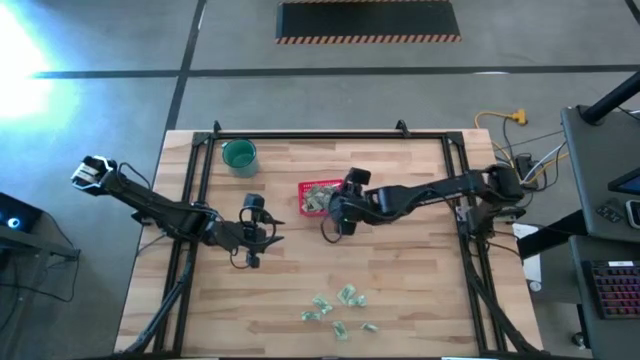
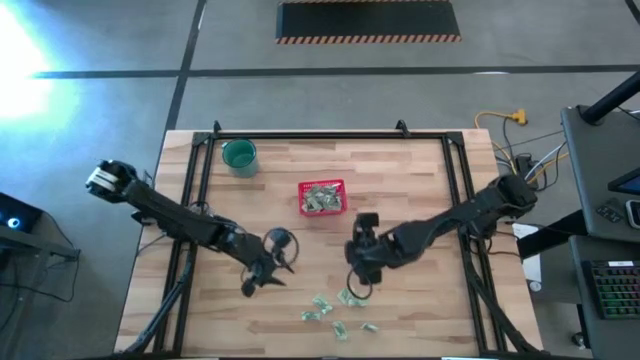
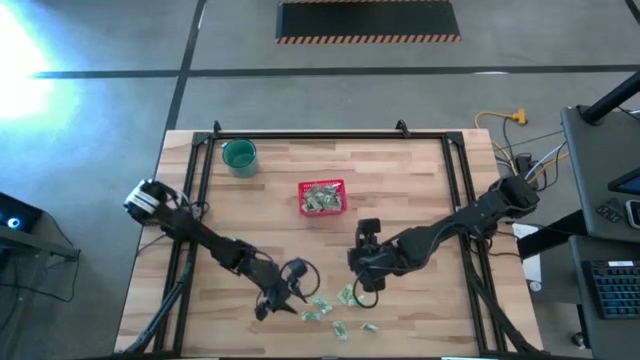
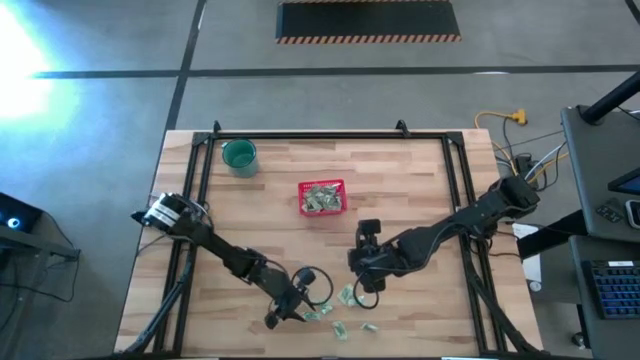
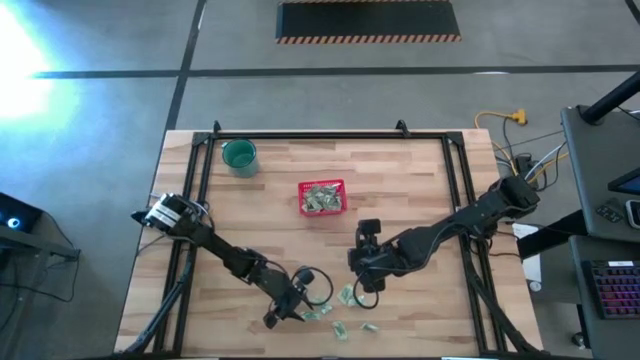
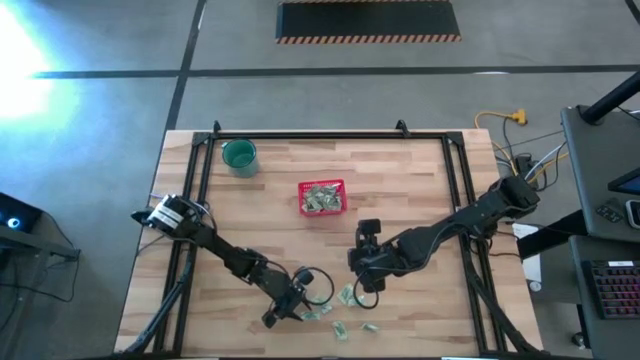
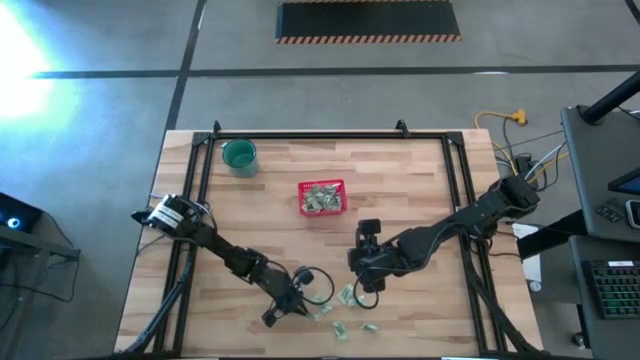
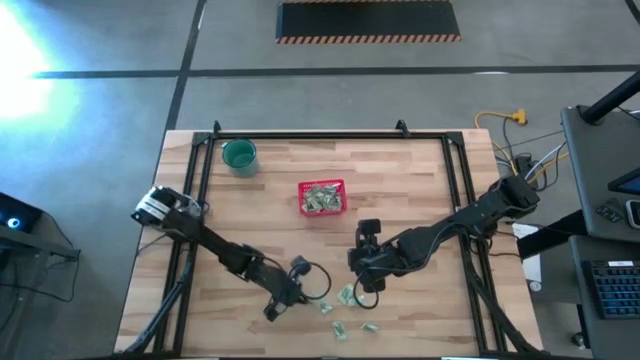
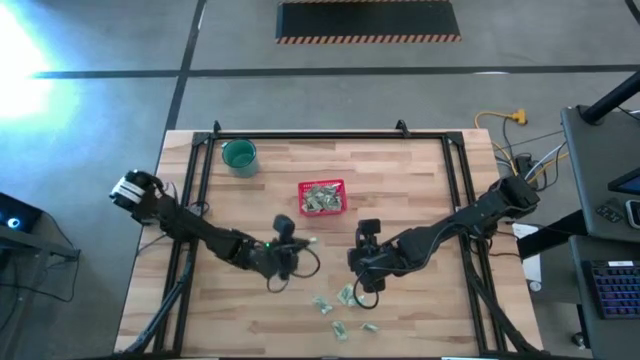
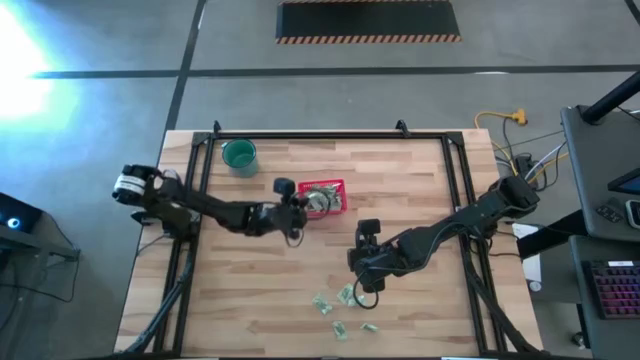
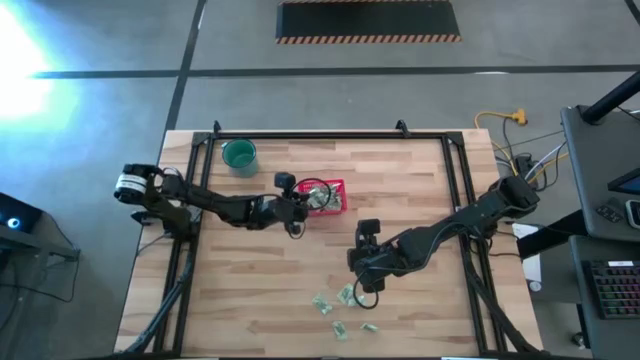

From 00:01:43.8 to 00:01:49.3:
Task: Pick and place items into bin
Put the stevia packet into the red bin

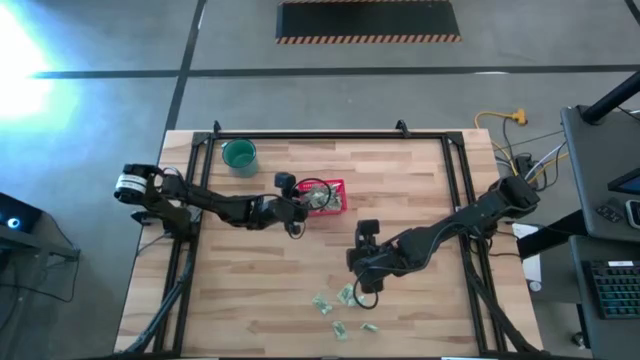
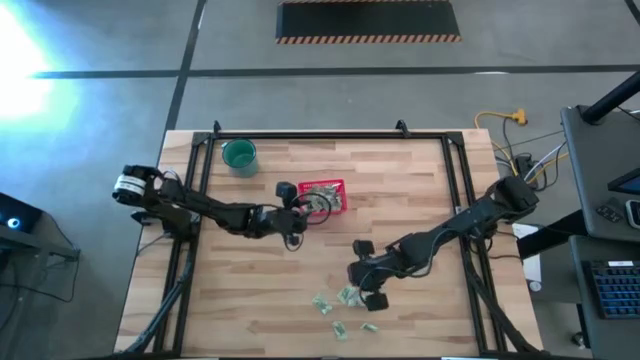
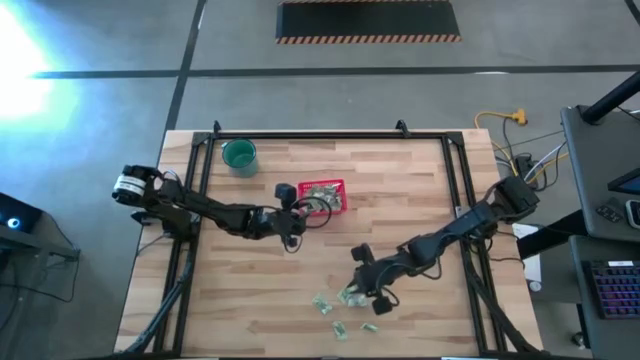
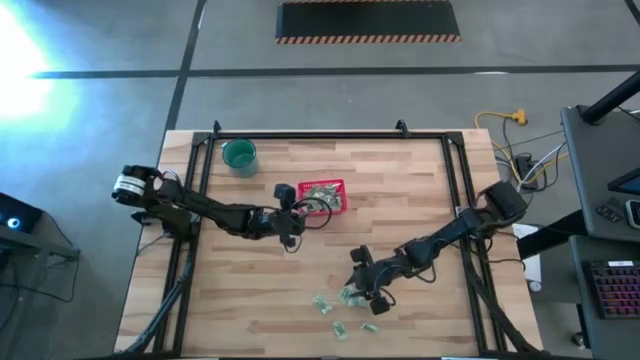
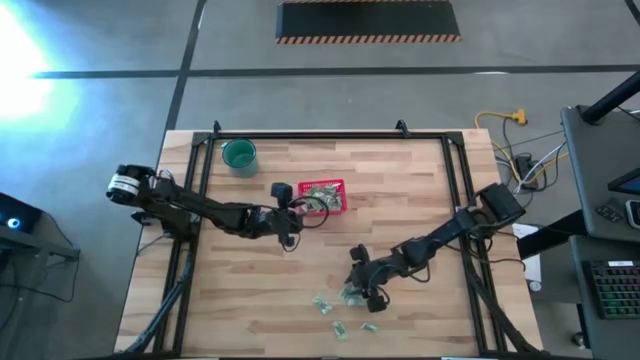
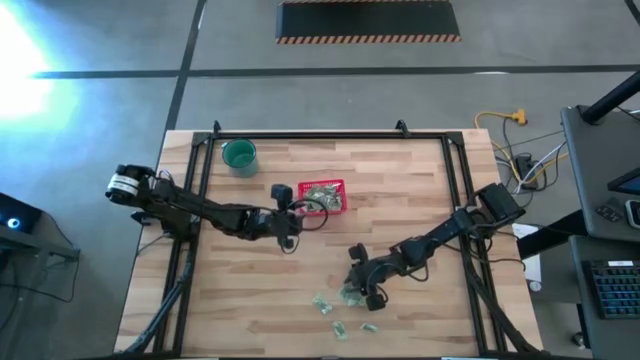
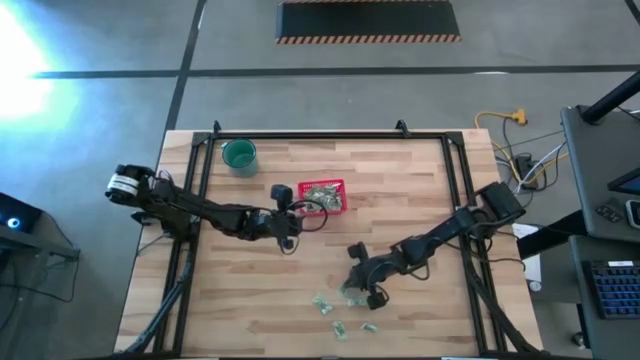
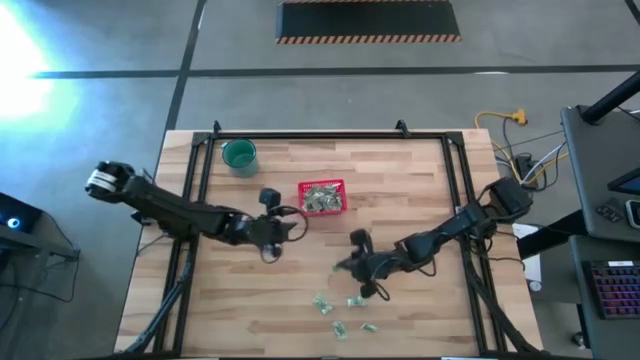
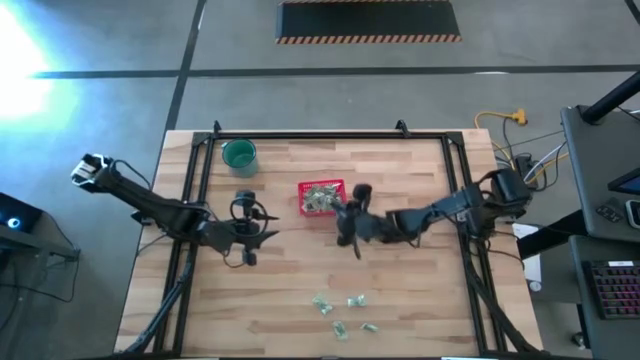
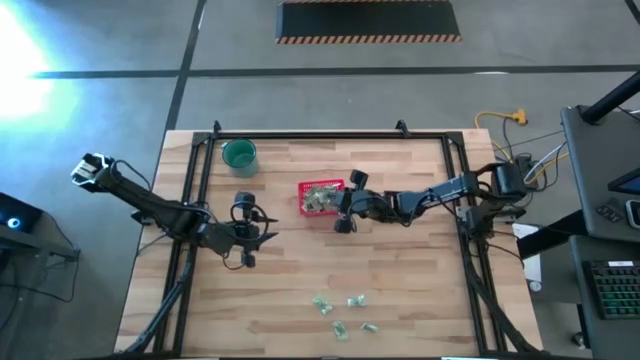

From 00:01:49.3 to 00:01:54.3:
Put the stevia packet into the red bin

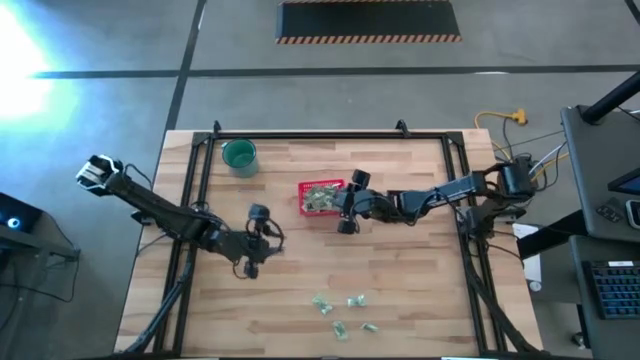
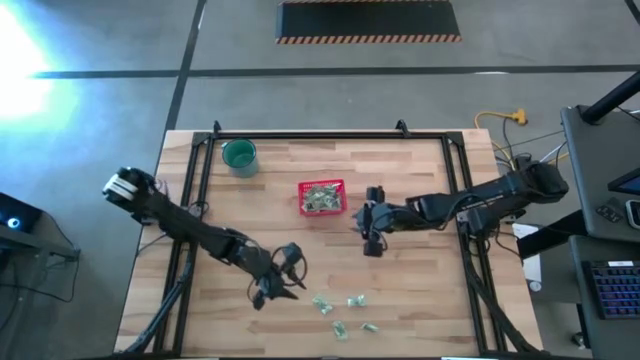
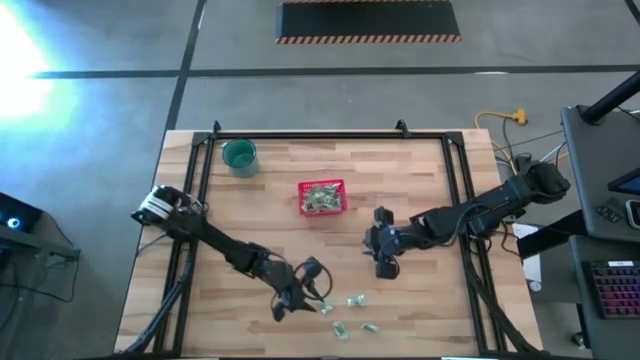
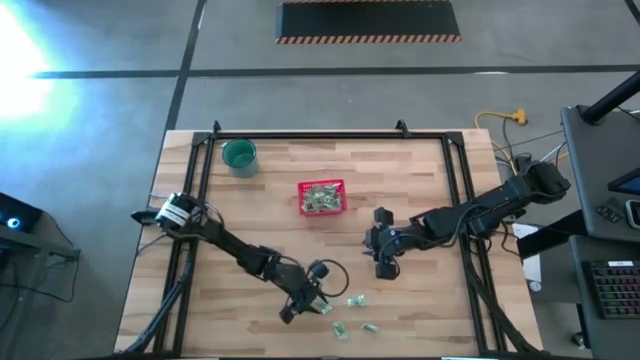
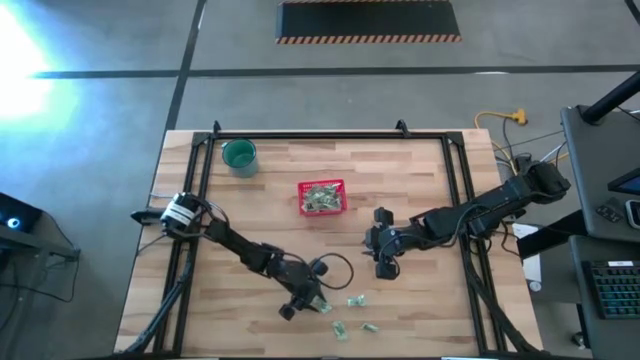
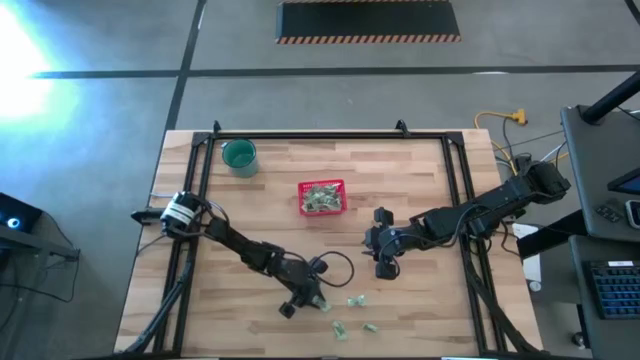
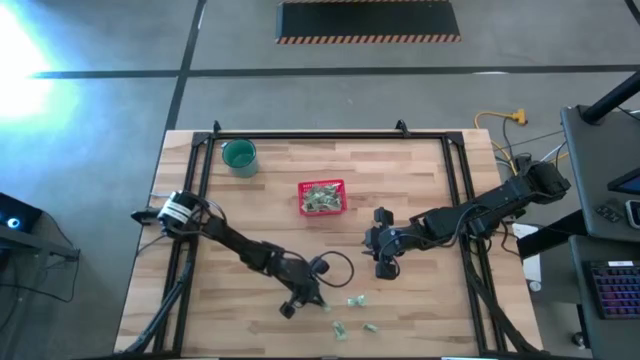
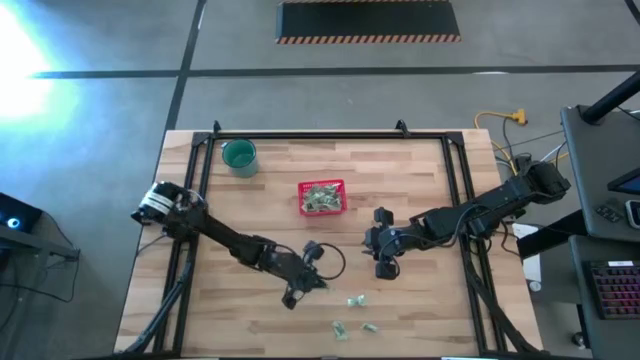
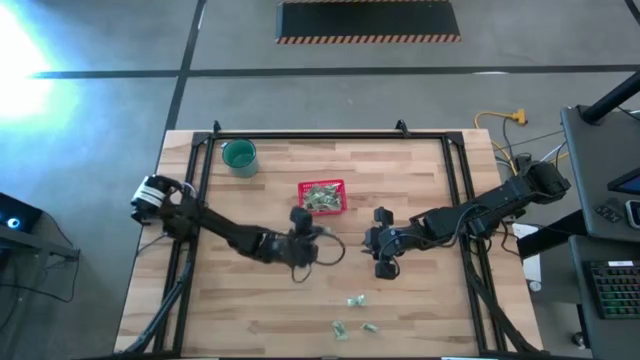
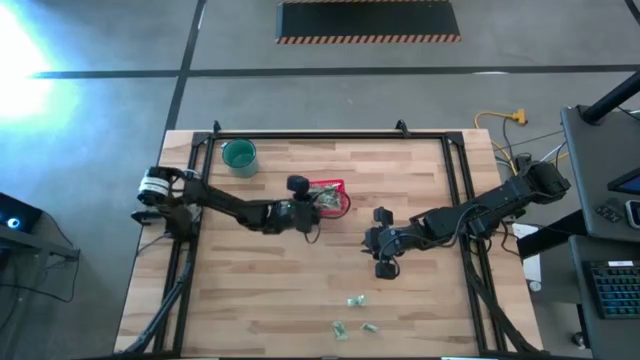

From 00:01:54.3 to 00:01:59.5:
Put the stevia packet into the red bin

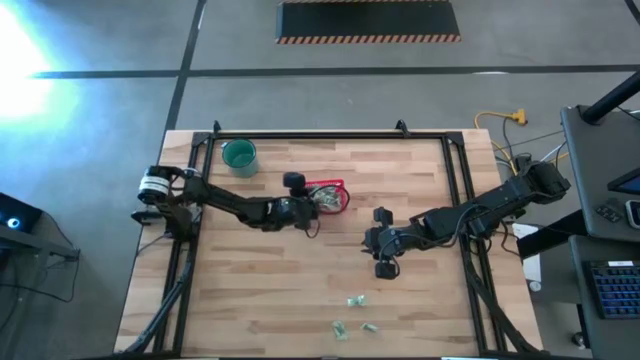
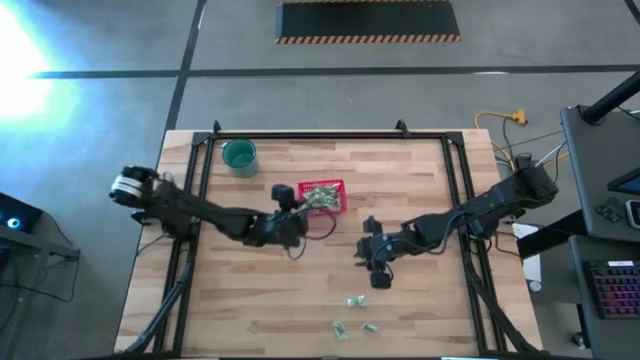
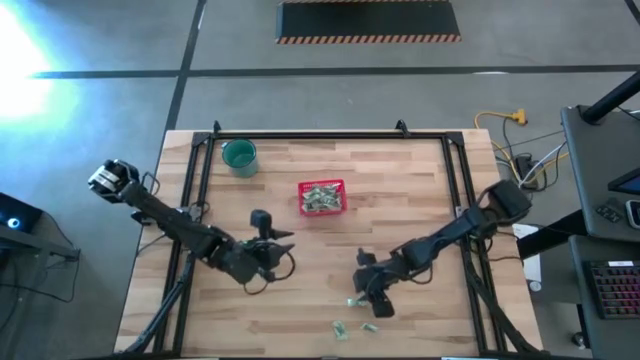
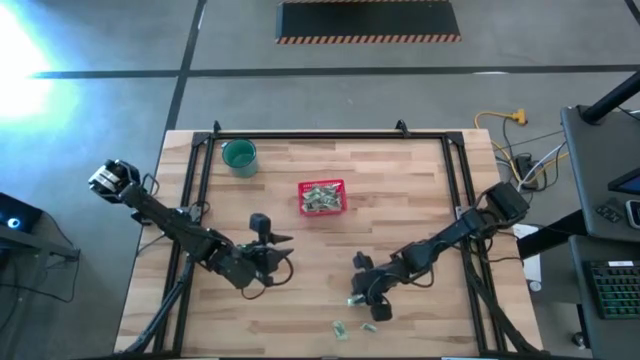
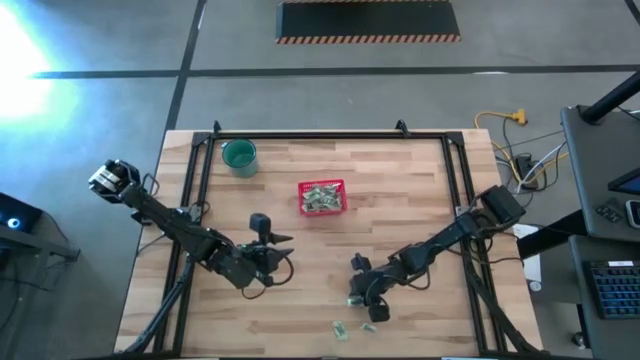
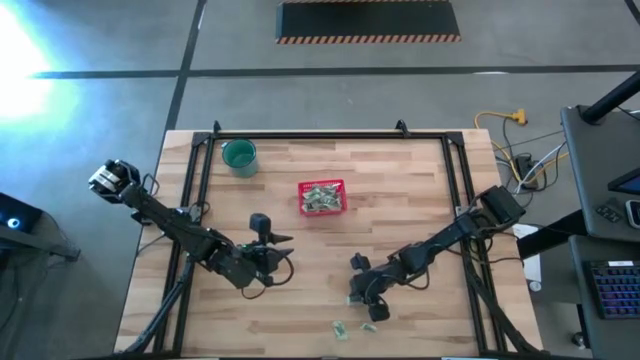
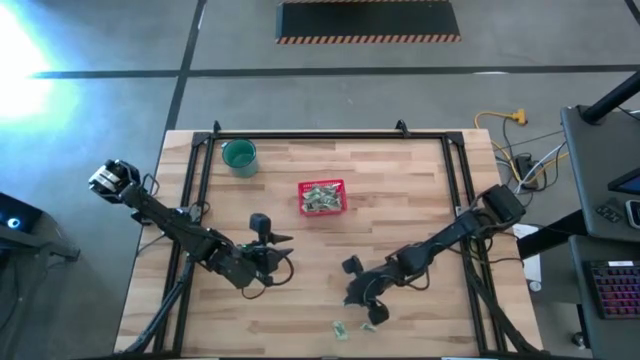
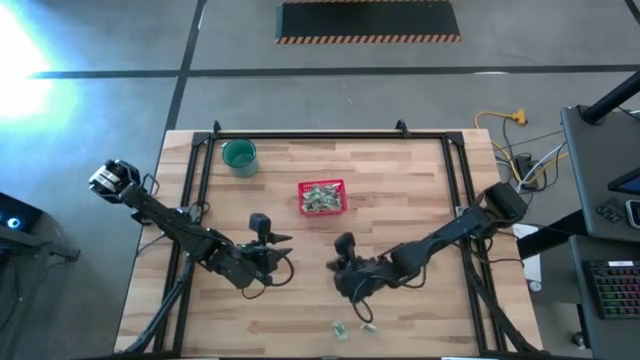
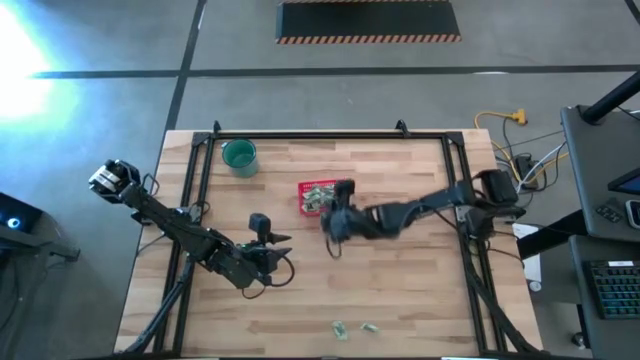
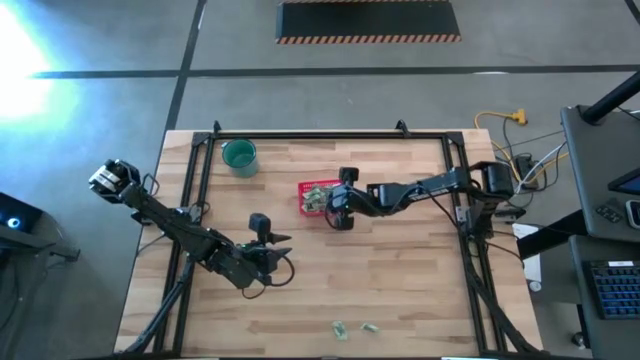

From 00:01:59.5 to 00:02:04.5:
Put the stevia packet into the red bin

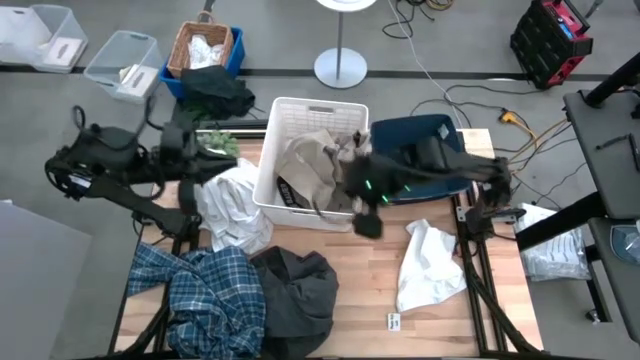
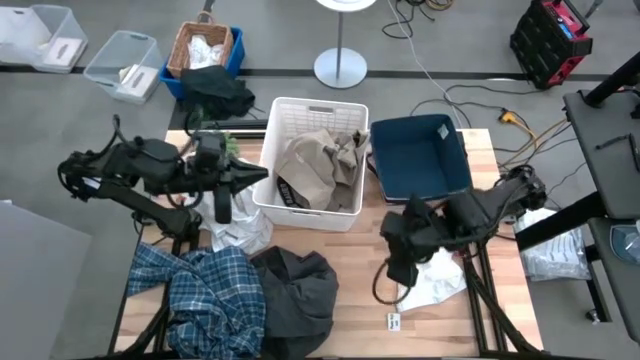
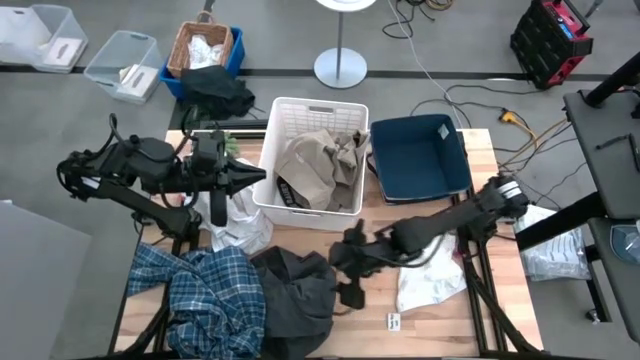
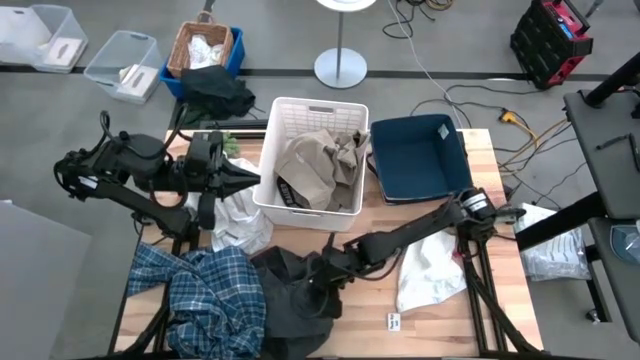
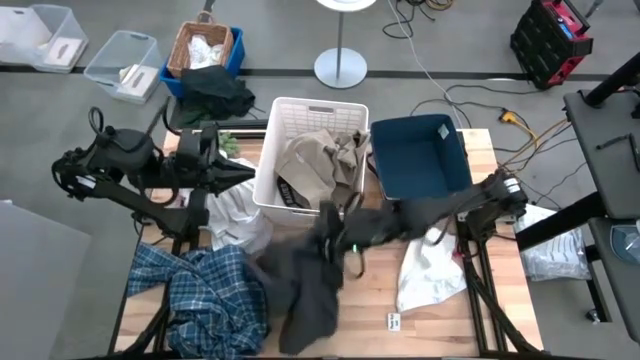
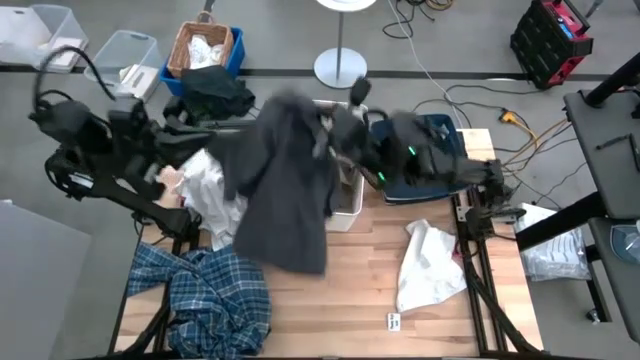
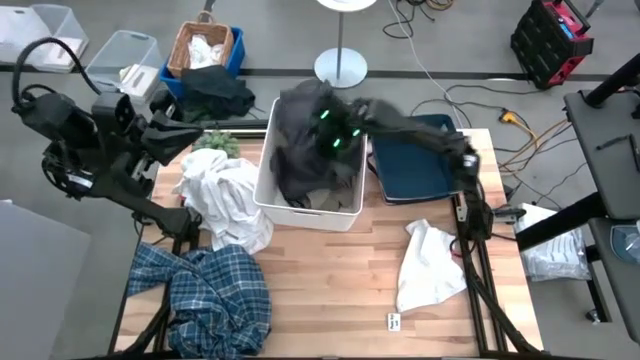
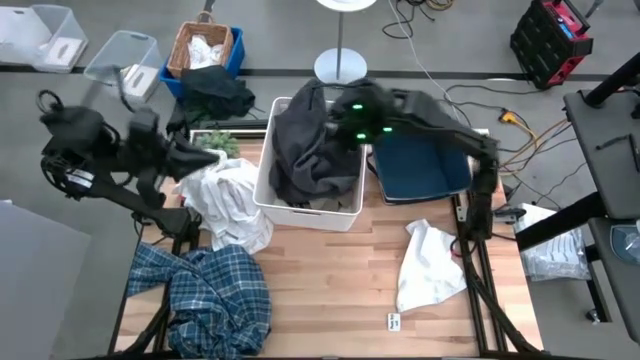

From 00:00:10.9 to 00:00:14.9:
Task: Sort clothes
Put the black pants into the white bin
